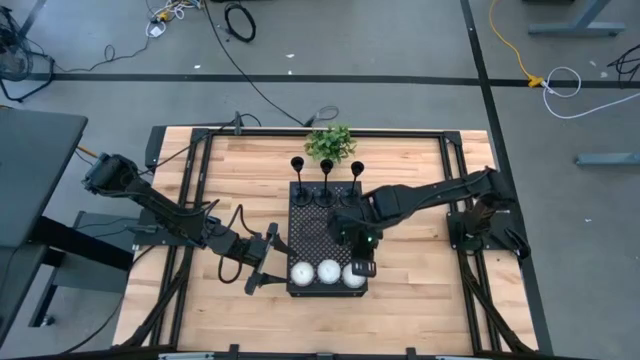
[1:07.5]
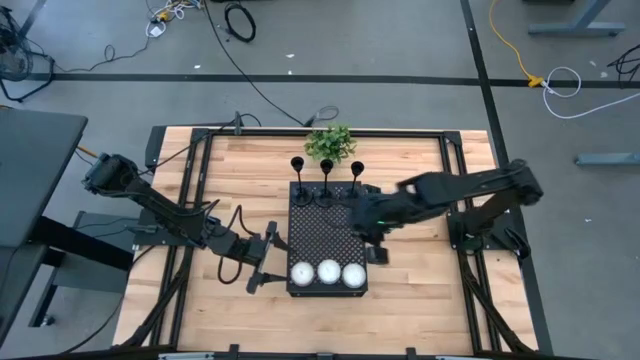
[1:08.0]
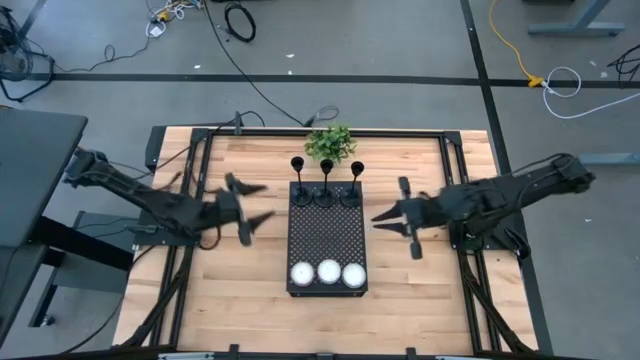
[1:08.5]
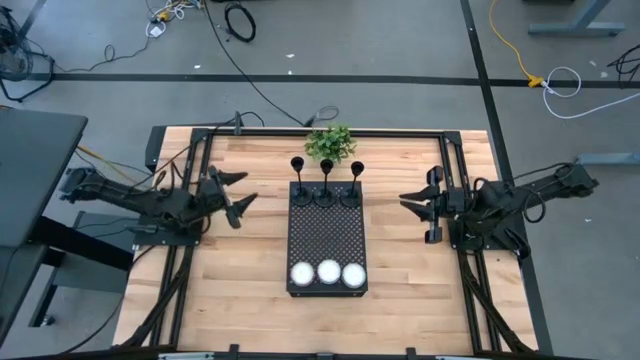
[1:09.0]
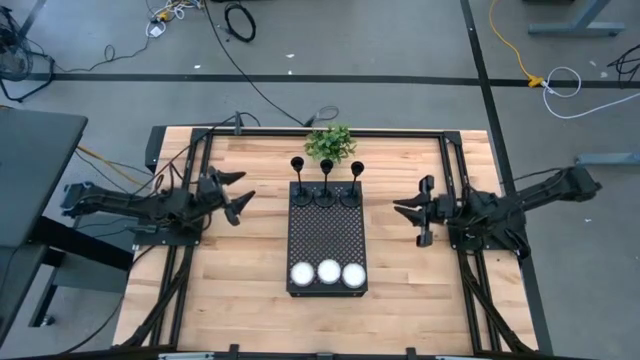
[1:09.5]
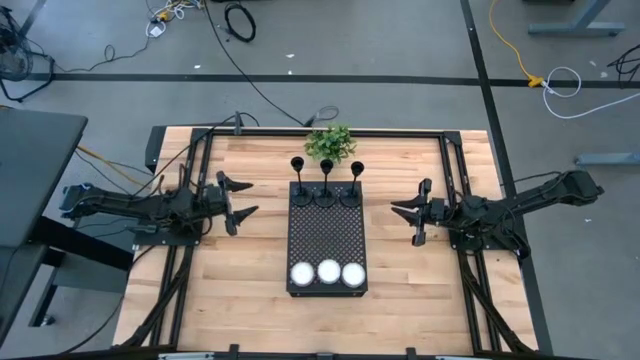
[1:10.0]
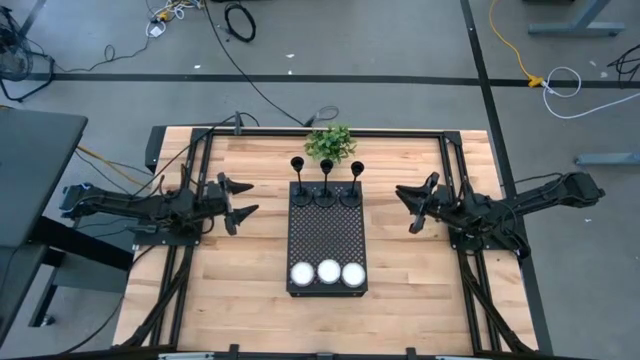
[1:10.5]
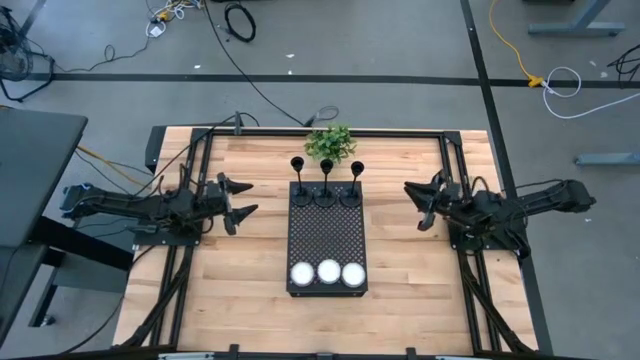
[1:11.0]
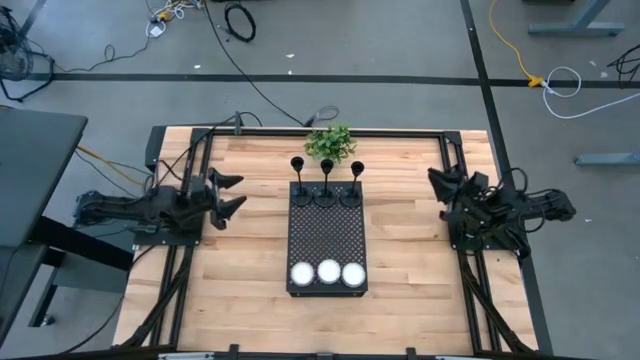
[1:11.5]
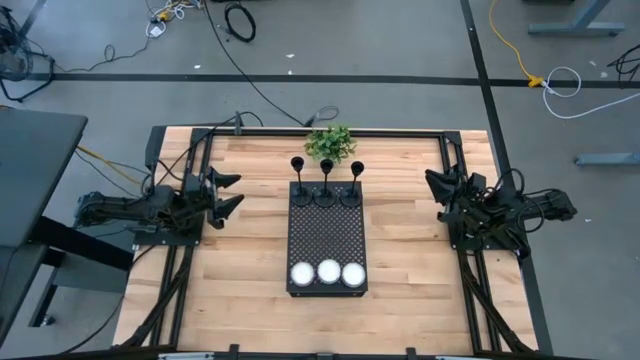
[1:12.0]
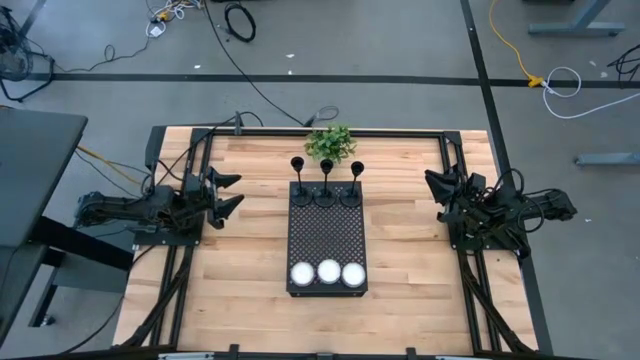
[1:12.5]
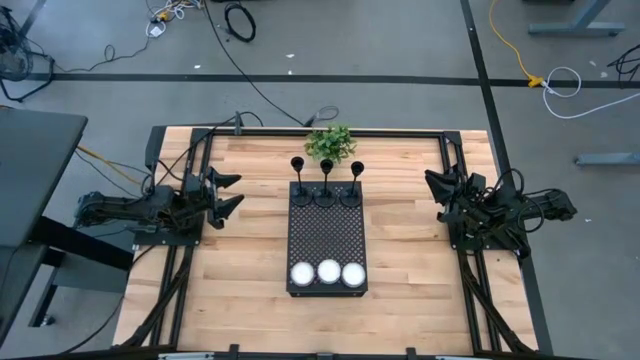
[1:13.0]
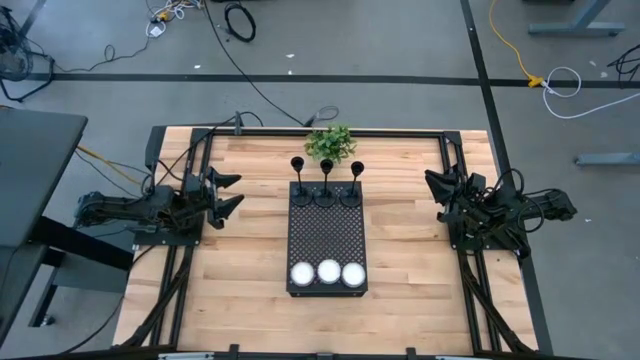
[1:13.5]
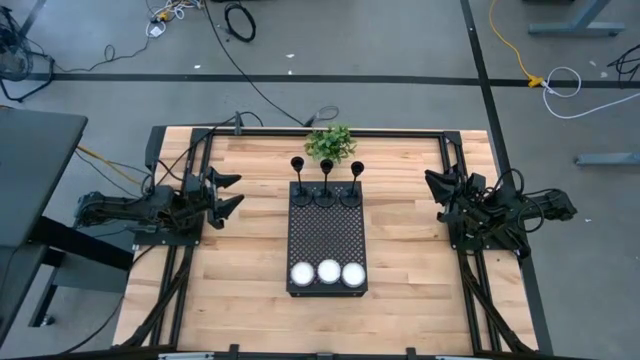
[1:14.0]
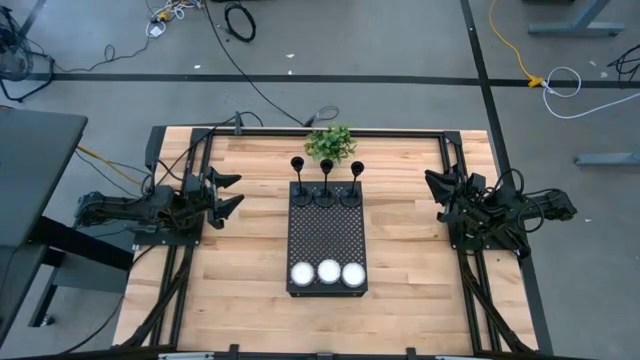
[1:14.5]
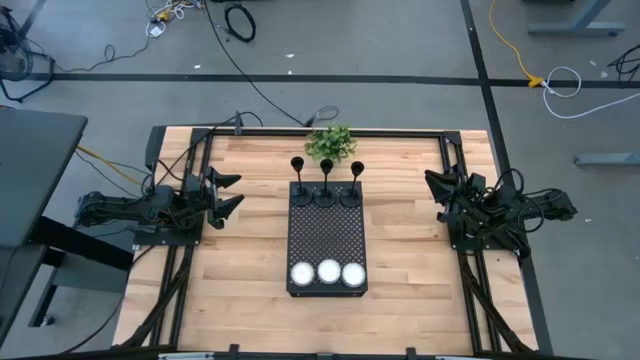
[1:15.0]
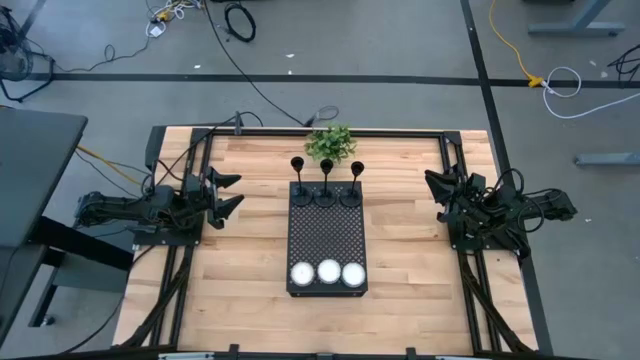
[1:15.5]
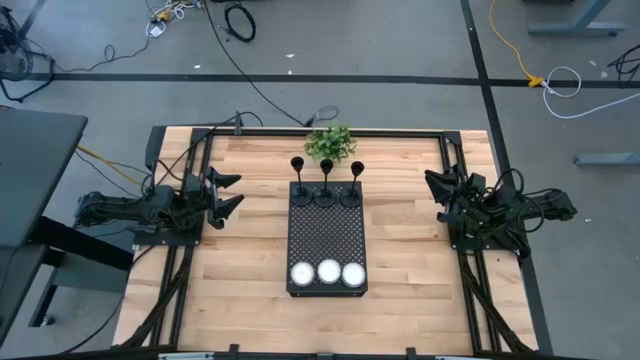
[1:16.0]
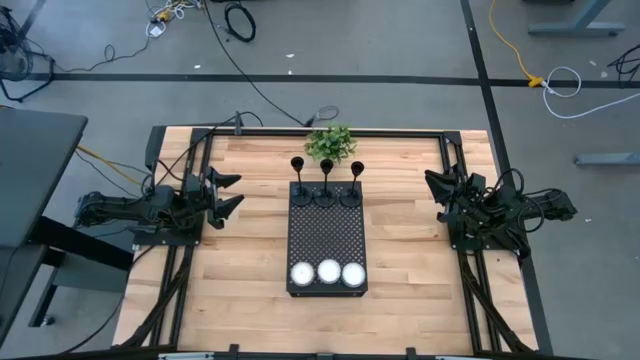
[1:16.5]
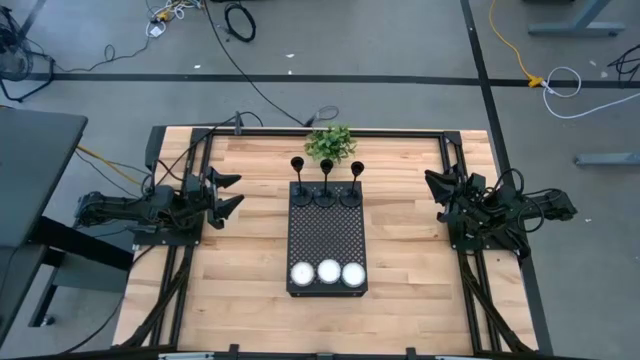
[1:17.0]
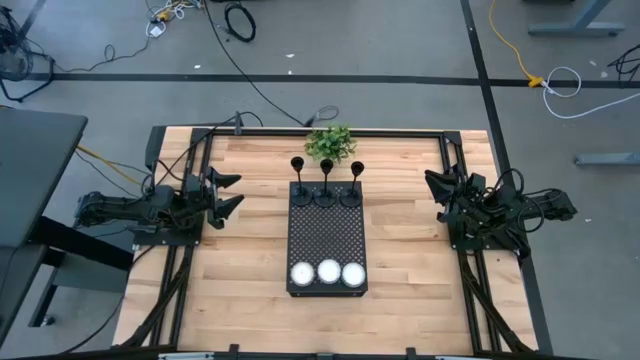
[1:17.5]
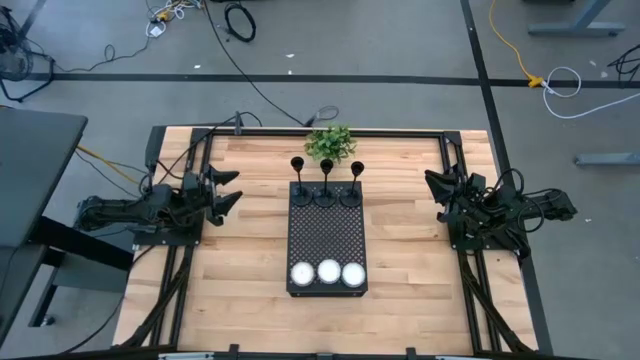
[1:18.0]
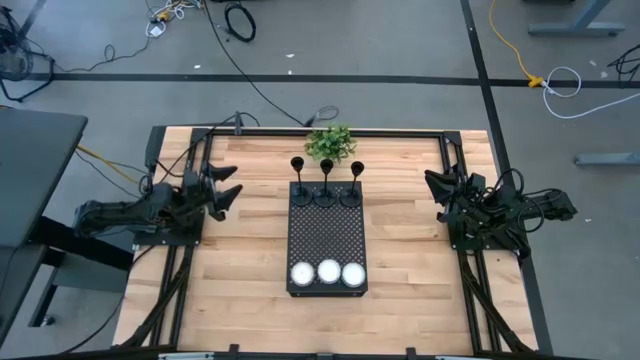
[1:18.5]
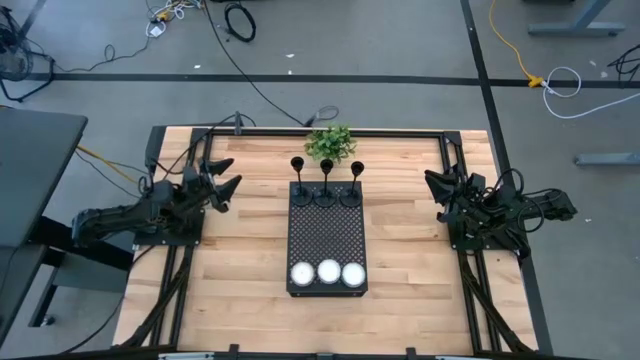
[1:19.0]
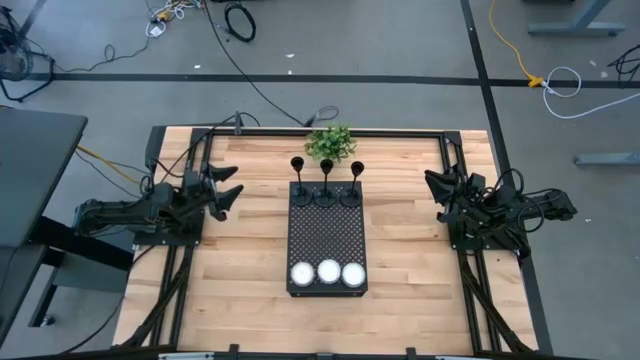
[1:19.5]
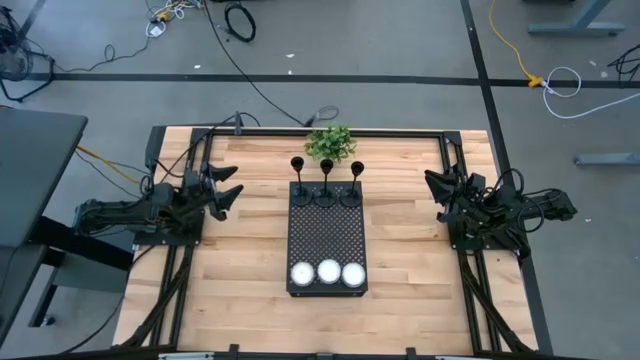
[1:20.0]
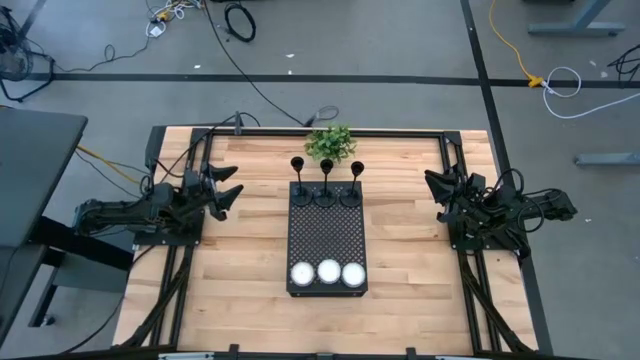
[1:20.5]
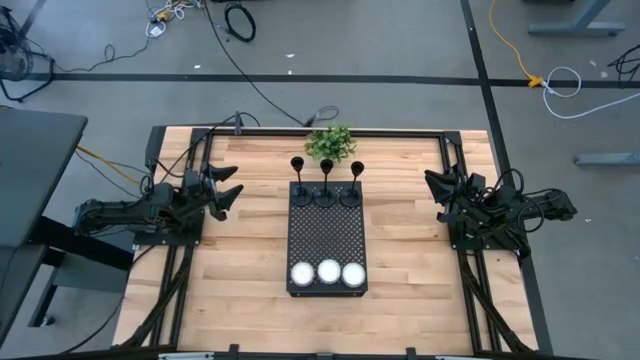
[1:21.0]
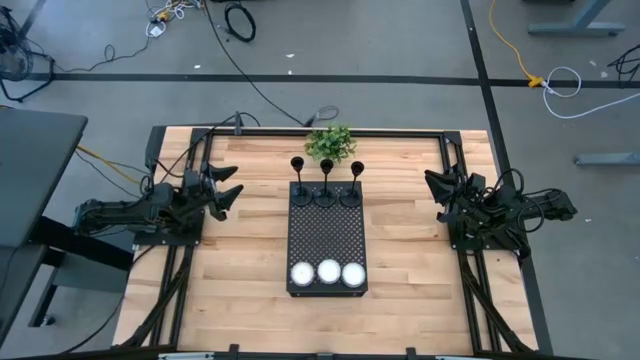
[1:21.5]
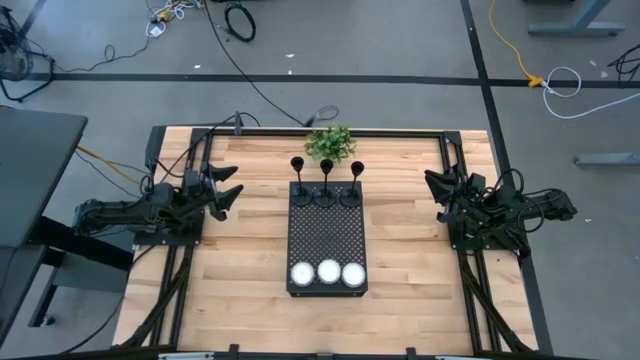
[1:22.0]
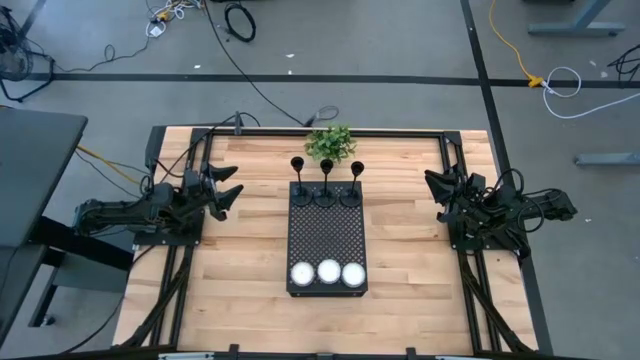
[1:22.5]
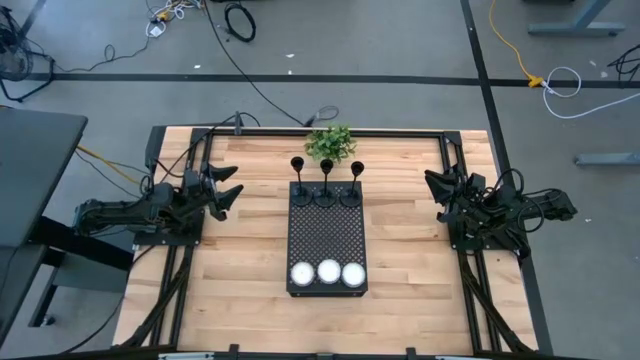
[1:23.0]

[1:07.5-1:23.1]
Task: Pick & Place candle stick holders
Return to Home Position

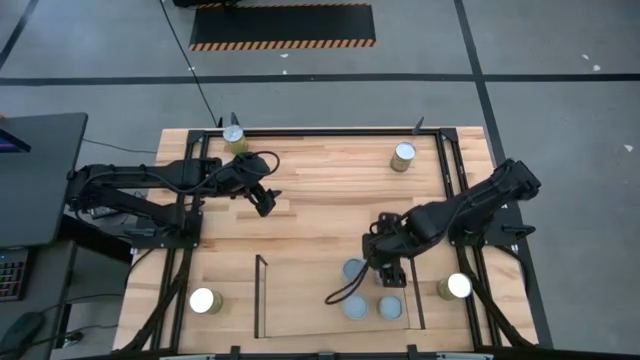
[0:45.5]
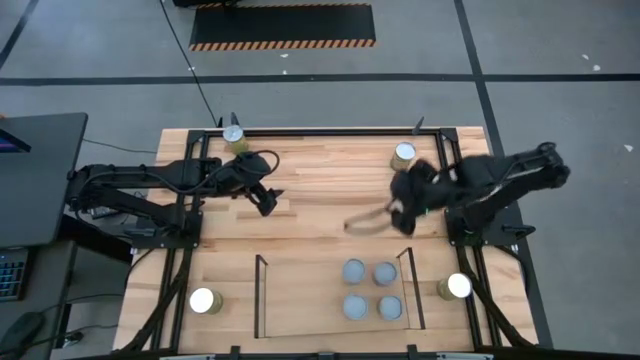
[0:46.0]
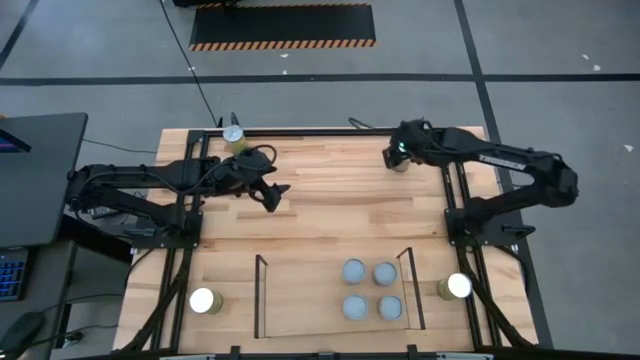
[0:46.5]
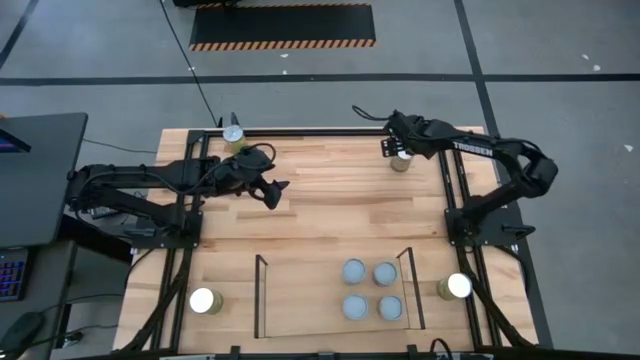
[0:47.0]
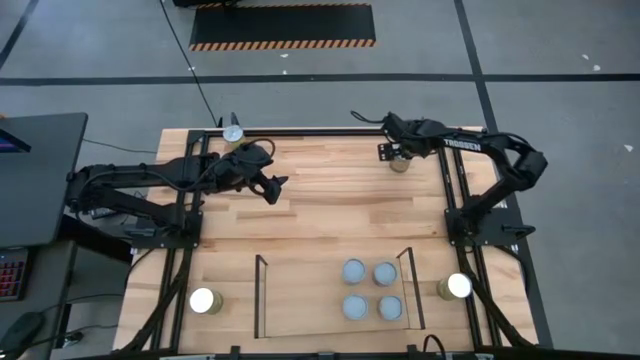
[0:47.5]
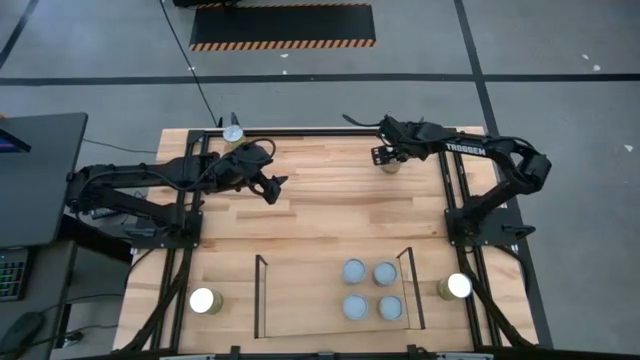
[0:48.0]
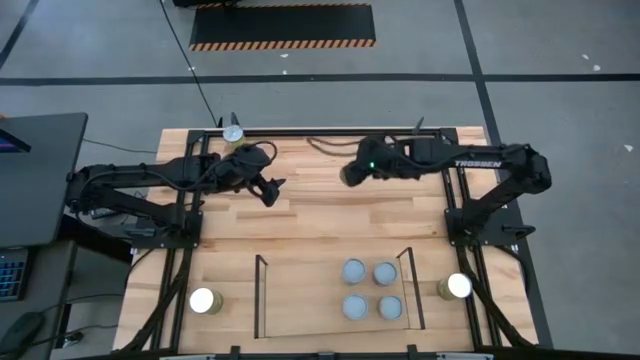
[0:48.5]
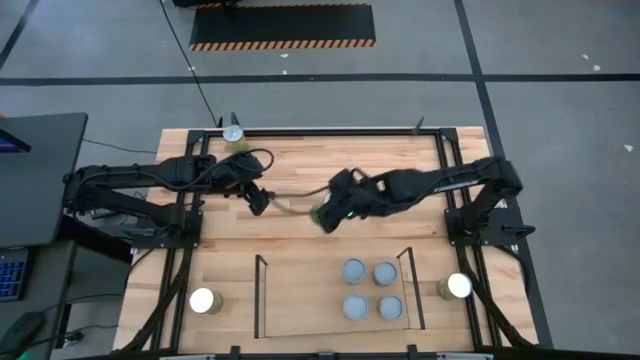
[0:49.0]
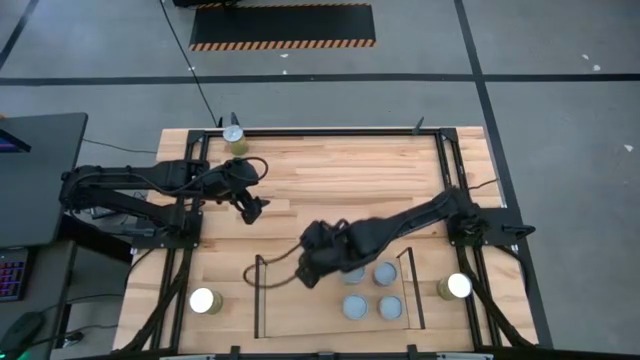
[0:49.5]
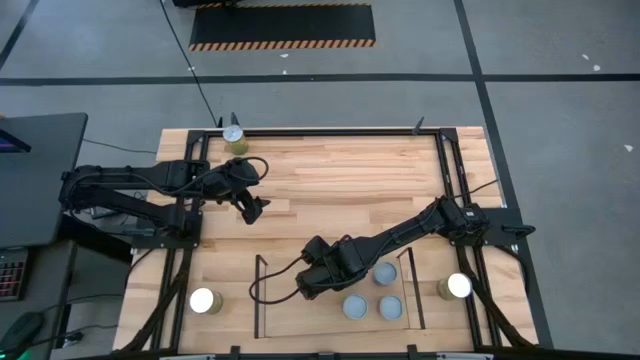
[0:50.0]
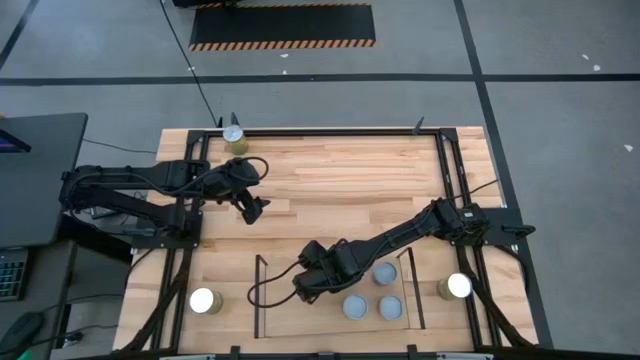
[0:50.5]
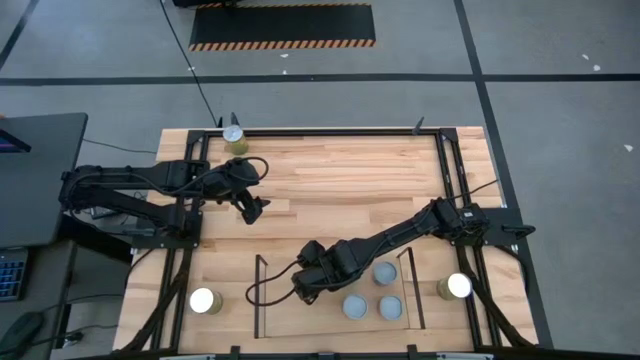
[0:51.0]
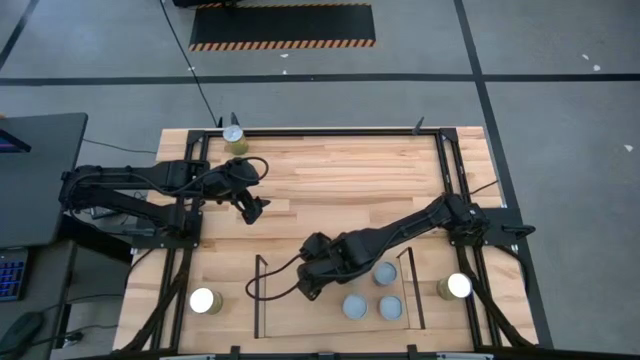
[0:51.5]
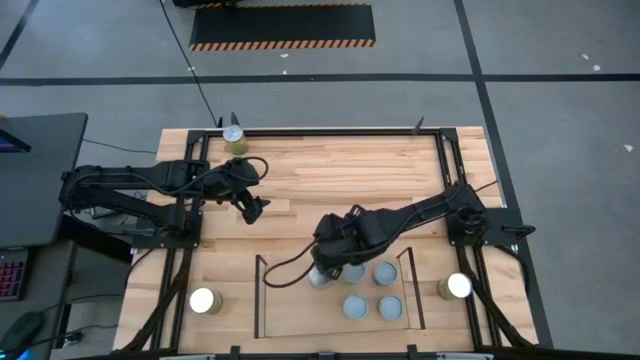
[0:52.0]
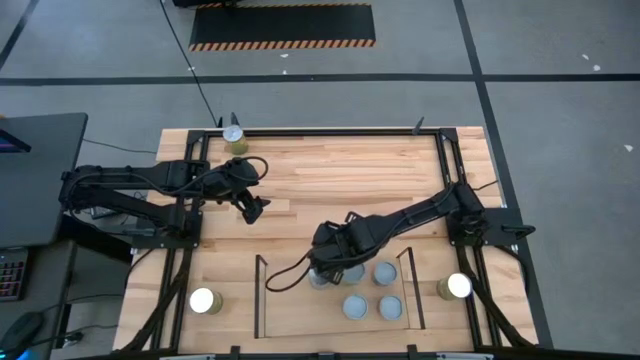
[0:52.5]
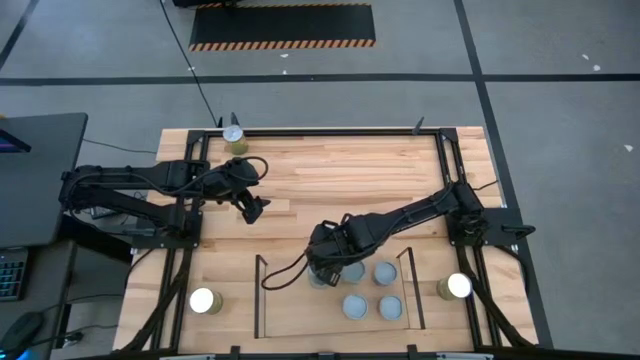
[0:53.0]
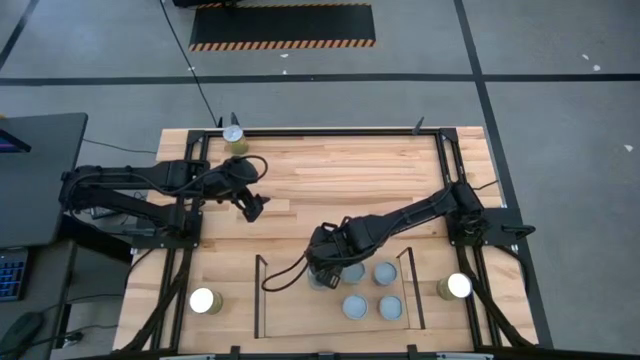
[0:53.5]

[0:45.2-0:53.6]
Task: Pick and place cans onto a shelf
Put the canned oranges on the bottom shelf
